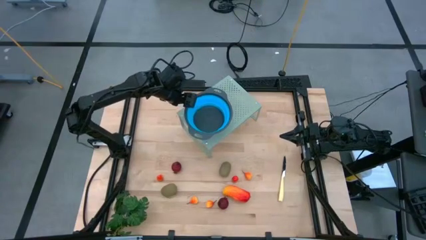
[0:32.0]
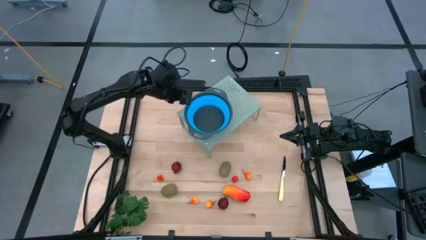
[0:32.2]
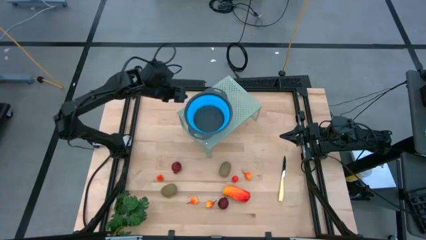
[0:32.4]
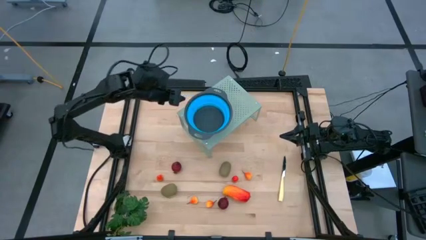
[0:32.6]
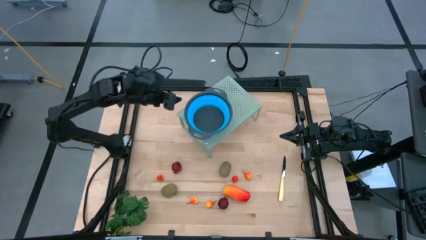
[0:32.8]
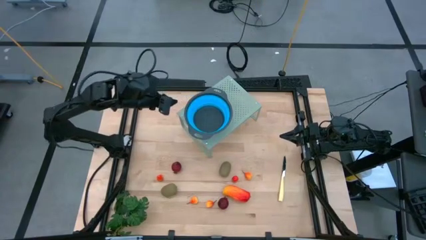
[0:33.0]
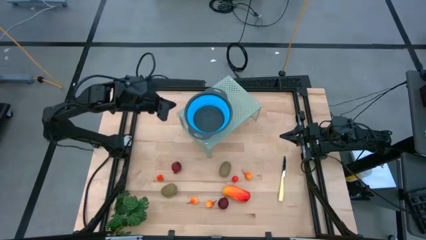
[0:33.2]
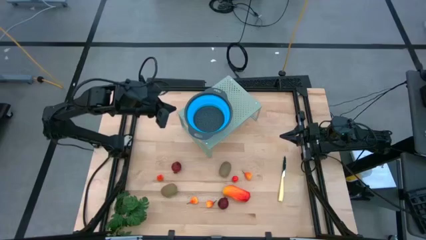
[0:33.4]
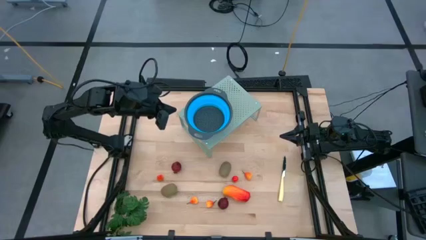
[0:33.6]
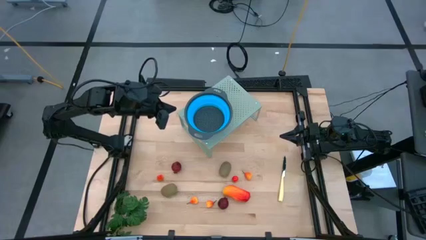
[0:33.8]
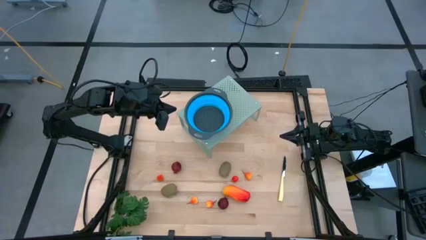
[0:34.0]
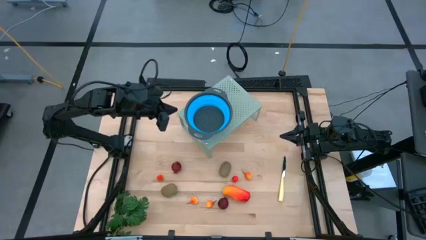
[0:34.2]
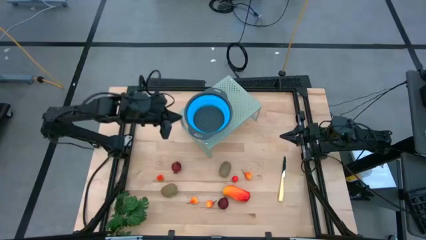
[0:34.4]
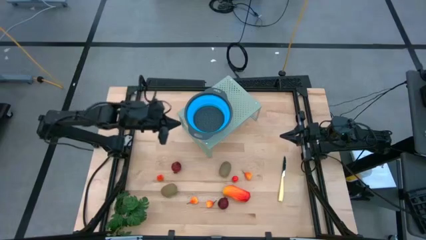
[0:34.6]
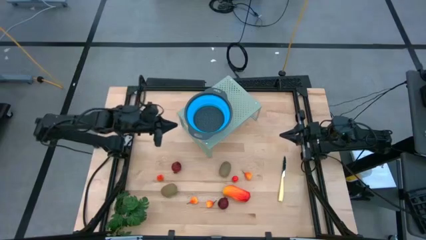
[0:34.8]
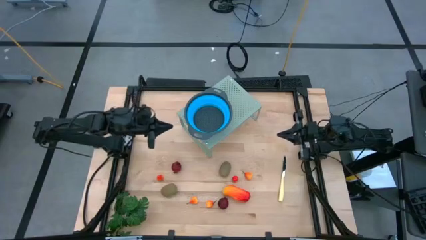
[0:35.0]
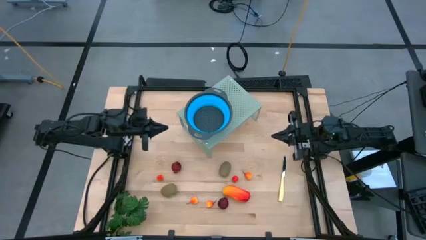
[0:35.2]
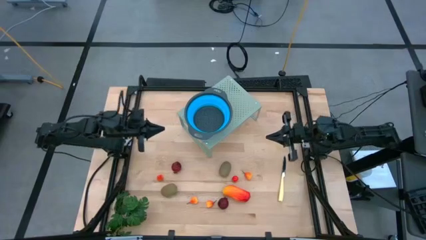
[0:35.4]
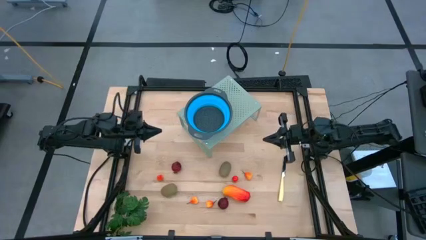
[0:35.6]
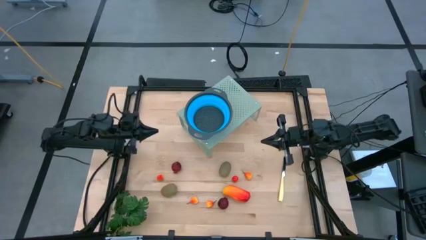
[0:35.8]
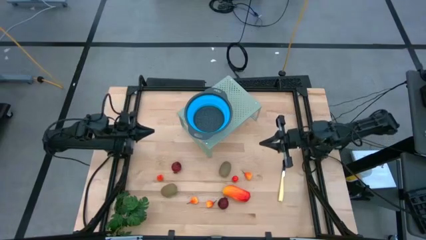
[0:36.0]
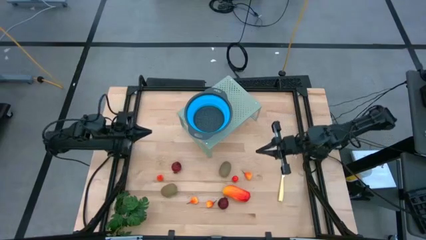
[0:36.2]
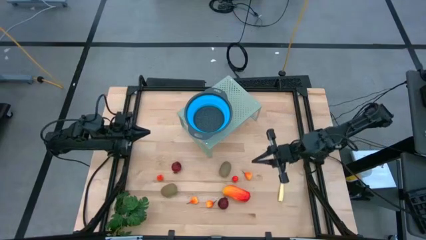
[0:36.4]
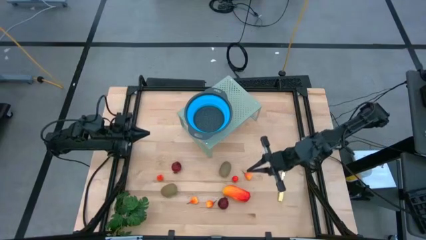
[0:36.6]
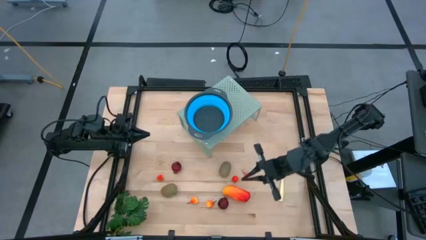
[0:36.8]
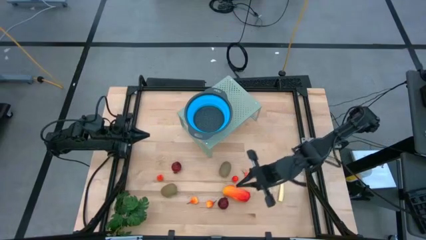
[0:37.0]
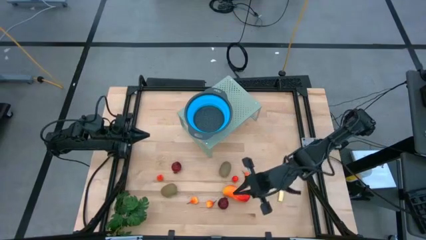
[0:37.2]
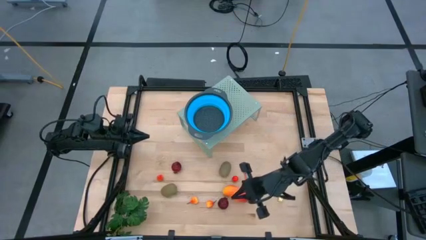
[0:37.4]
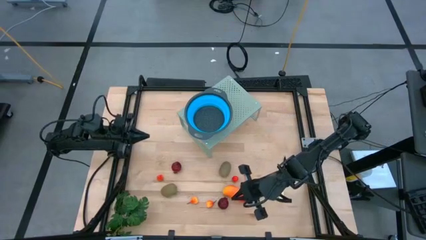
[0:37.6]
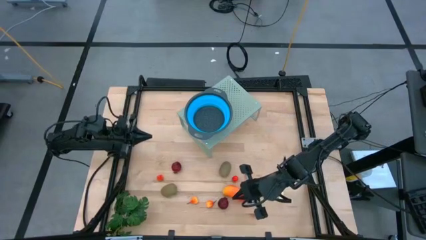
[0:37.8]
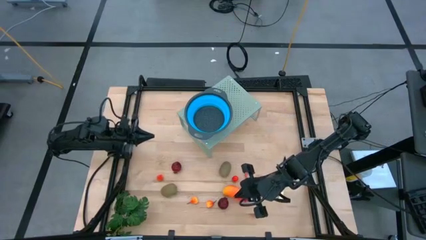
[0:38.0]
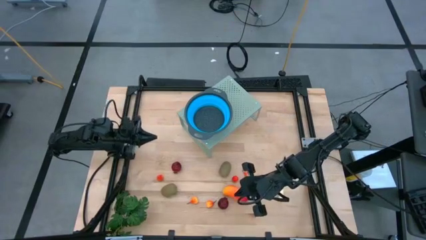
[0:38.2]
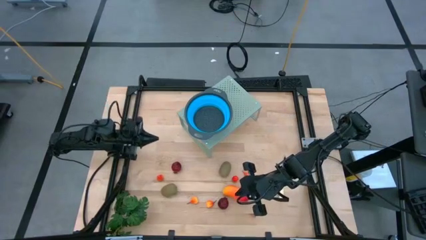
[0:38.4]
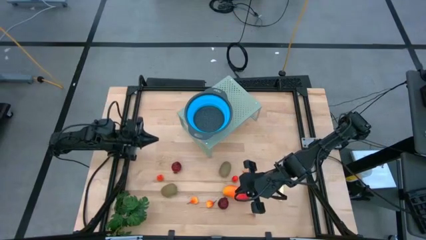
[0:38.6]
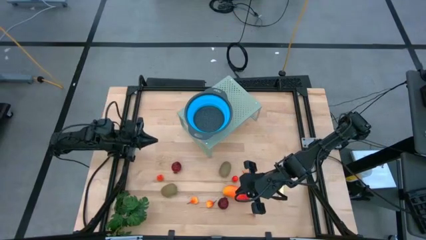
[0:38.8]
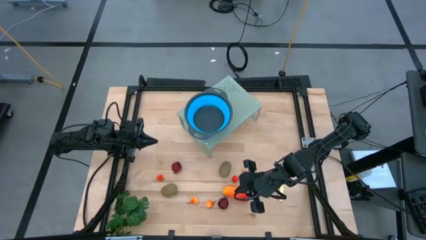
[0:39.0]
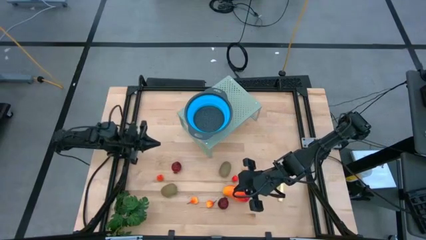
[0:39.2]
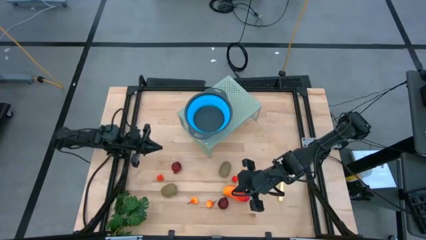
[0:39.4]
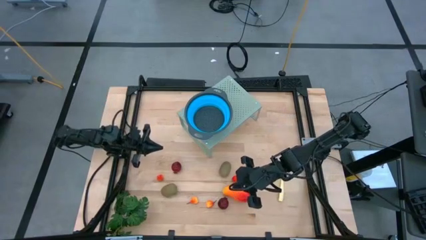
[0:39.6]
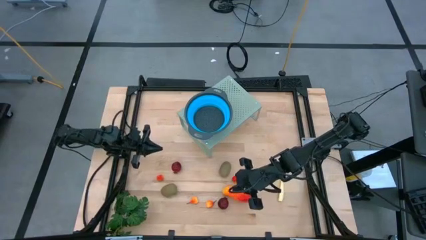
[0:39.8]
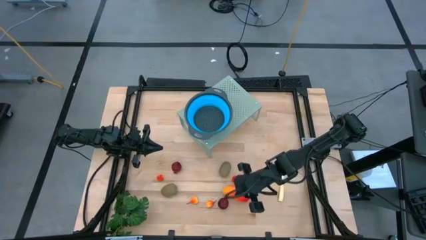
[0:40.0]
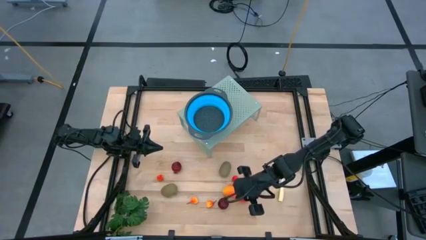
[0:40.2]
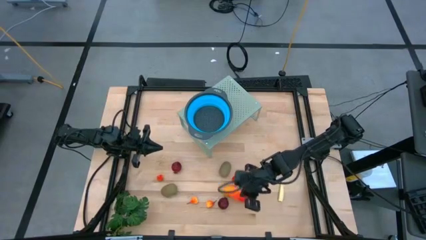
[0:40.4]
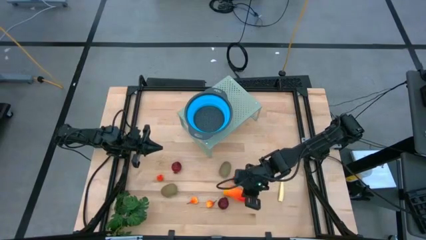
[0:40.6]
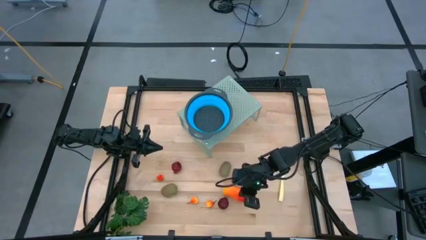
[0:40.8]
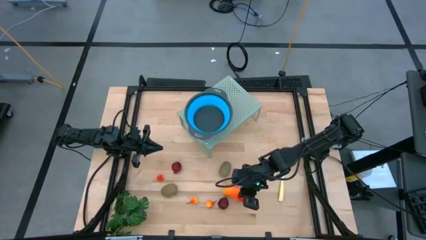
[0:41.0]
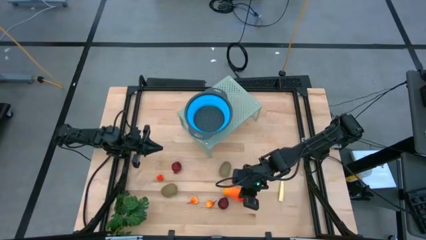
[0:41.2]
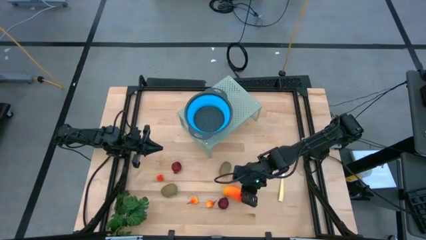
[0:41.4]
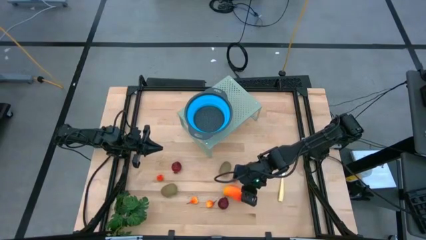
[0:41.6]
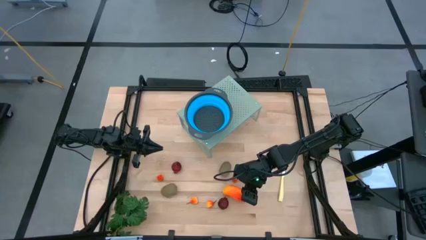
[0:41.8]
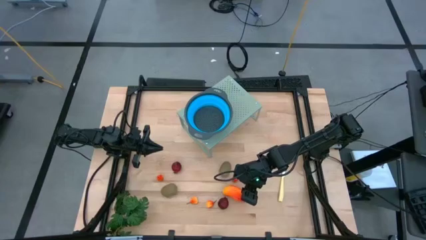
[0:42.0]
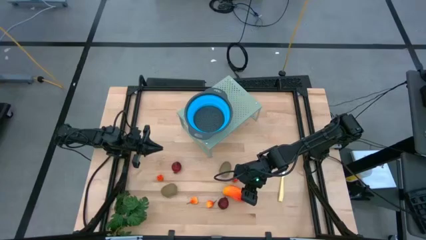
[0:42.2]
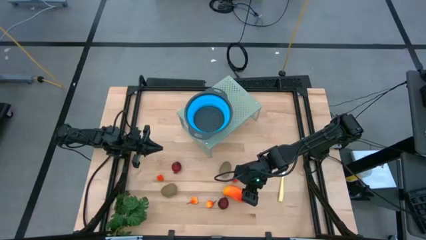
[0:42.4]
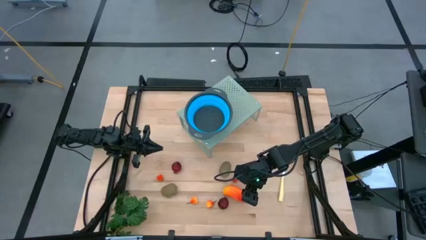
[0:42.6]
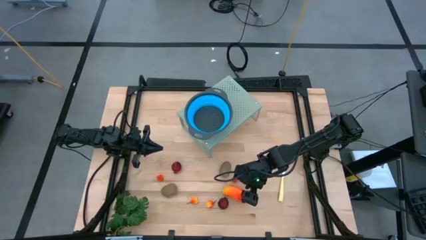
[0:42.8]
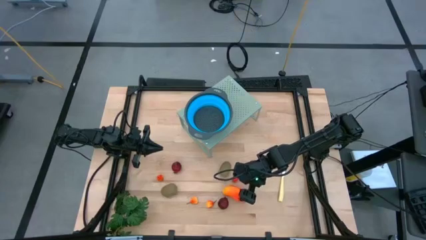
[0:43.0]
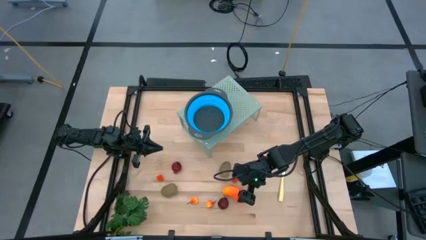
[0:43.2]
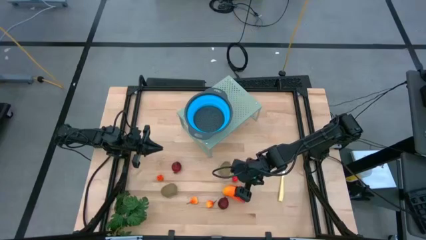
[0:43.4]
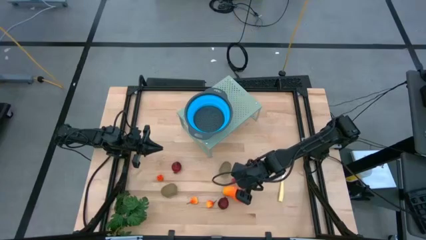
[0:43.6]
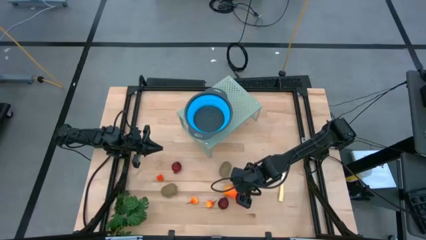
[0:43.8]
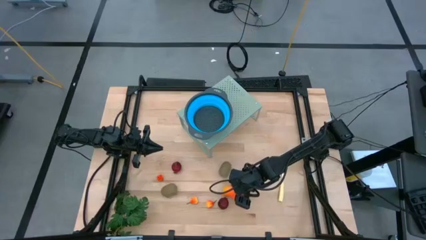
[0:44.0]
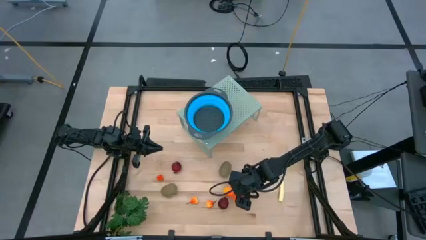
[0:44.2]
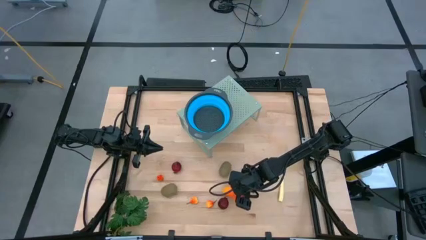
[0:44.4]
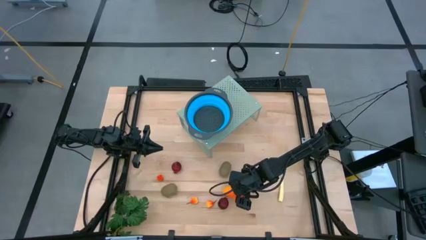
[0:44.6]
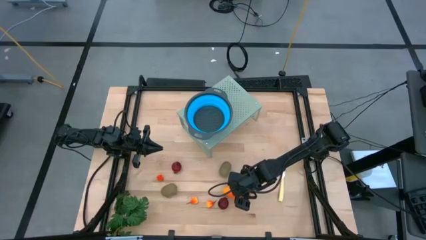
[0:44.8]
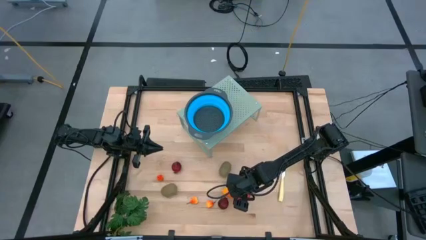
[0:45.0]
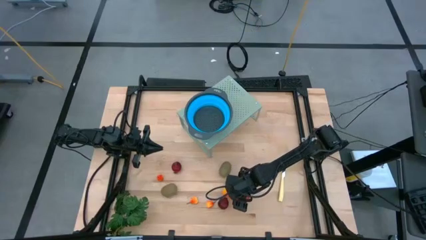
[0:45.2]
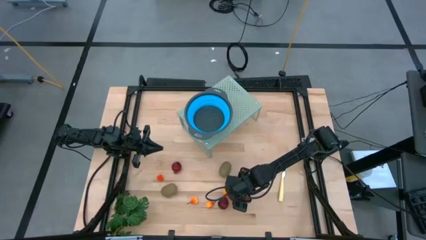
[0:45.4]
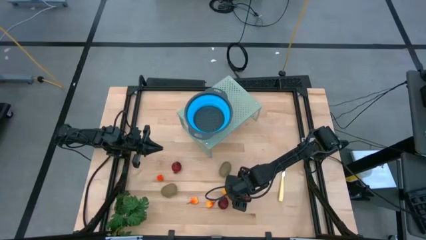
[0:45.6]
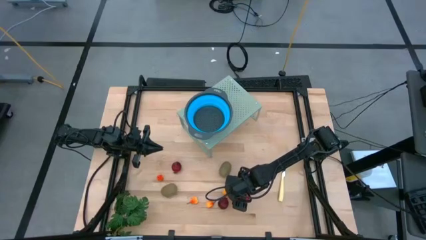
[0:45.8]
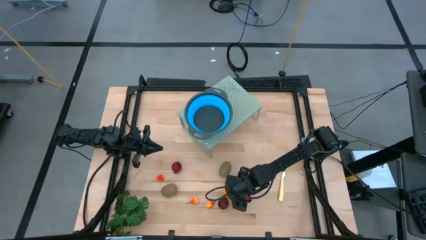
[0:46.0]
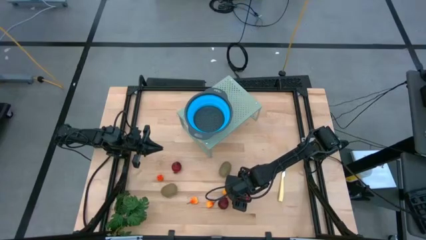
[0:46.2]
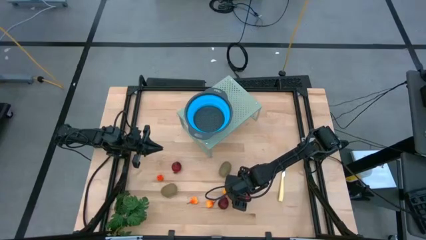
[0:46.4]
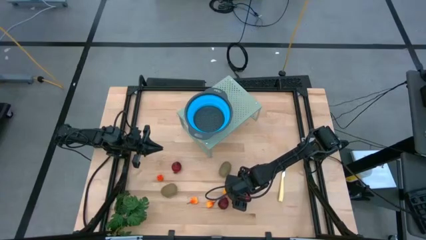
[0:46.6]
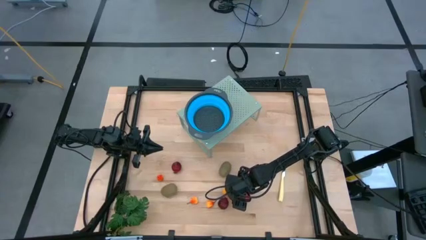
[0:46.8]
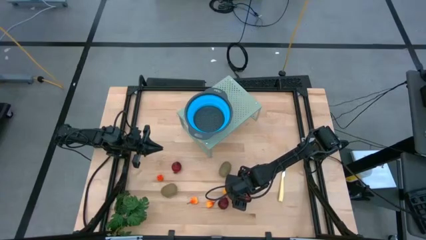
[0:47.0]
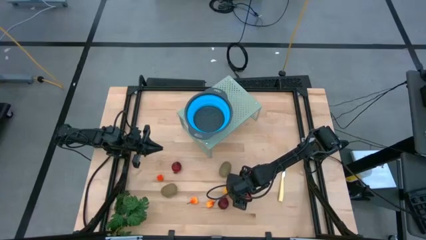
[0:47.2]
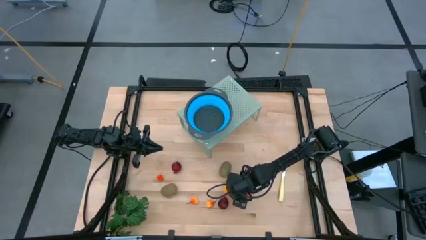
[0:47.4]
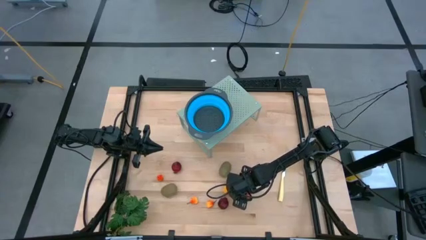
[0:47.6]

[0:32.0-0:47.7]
Task: Pick & Place Fruit
Put the red yellow mango into the blue strainer bowl on the shelf
